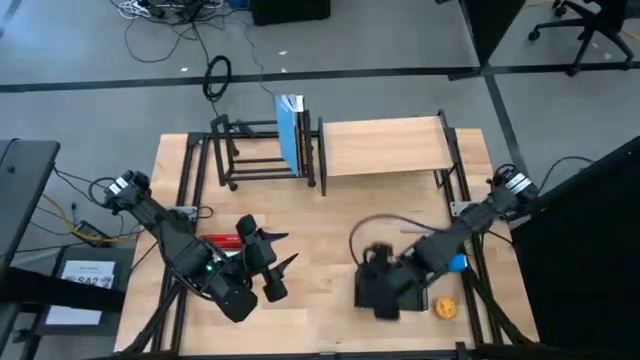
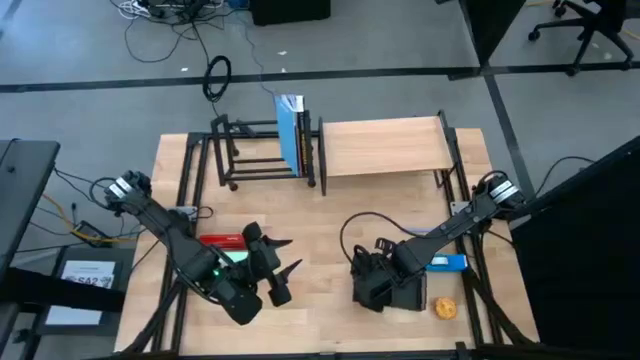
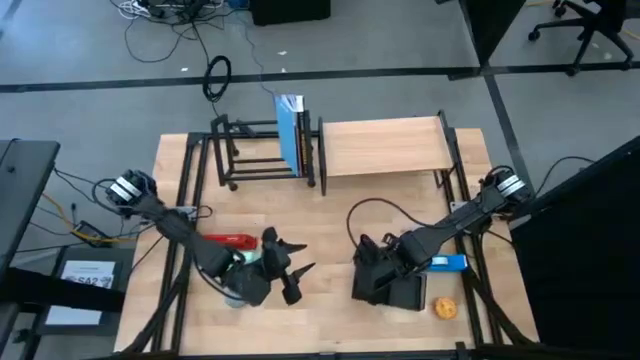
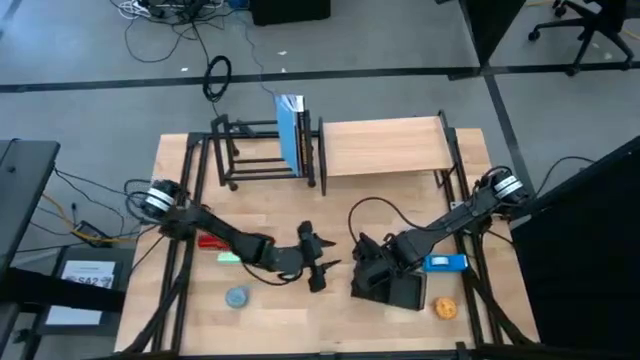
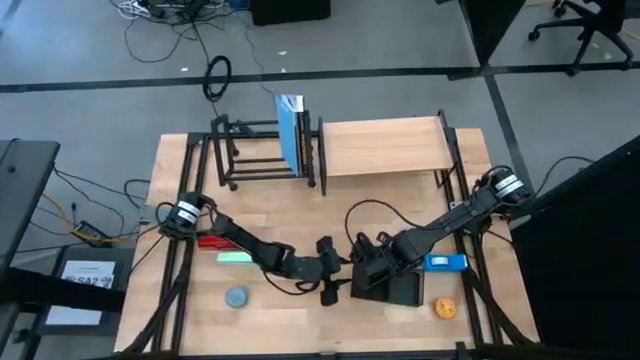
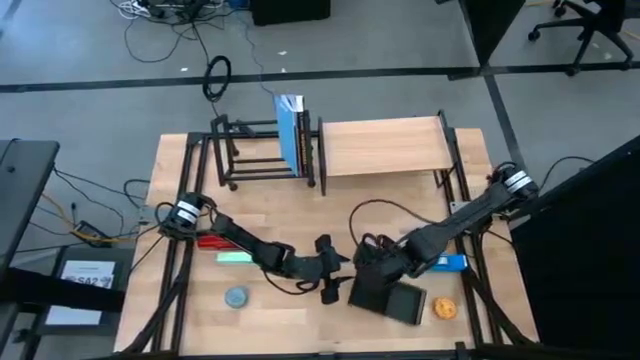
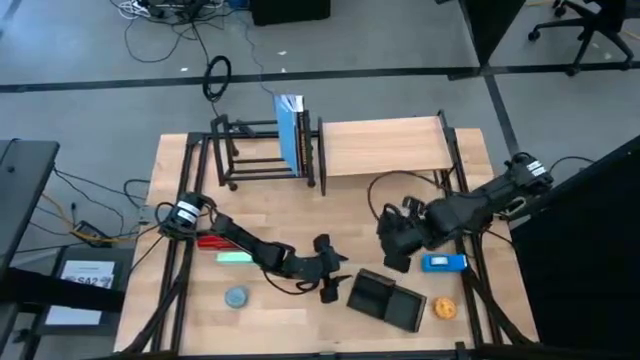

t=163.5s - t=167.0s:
Task: Stock shelves
Remove the blue ball pen from the pen organizer

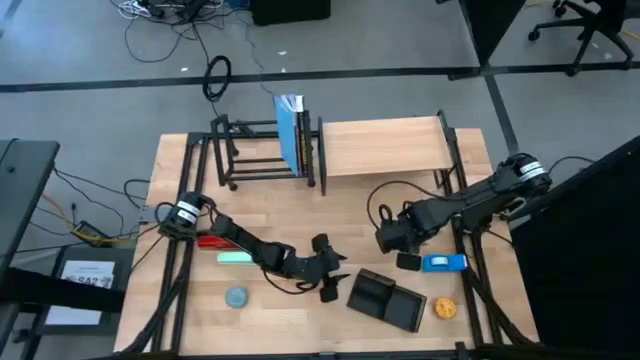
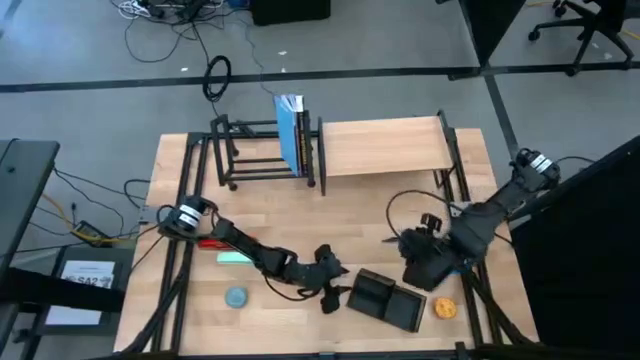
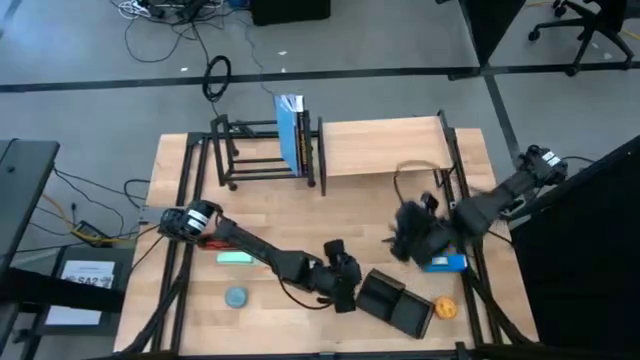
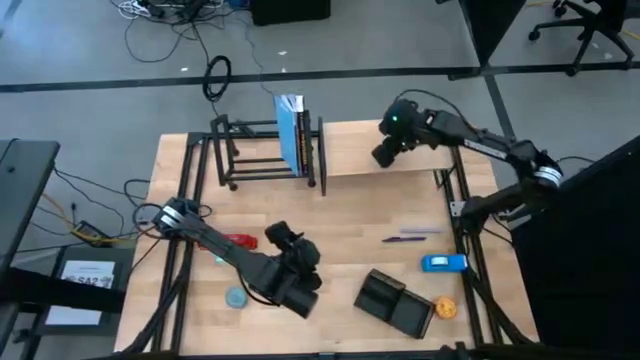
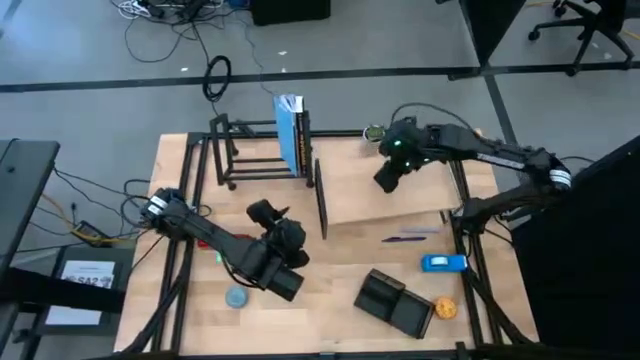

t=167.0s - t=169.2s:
Adjust the pen organizer and shelf

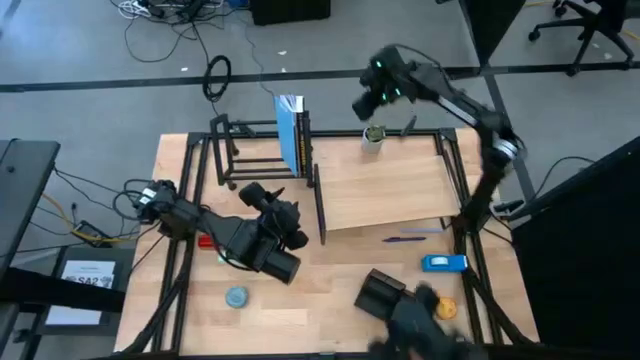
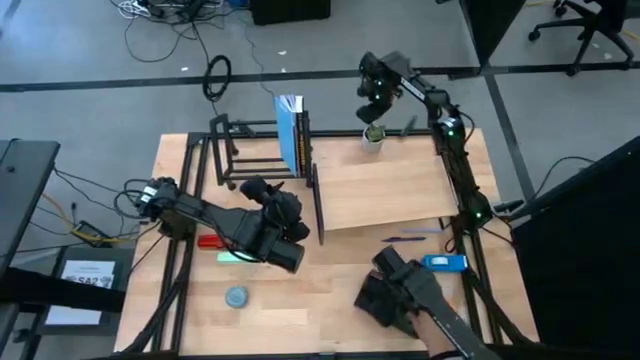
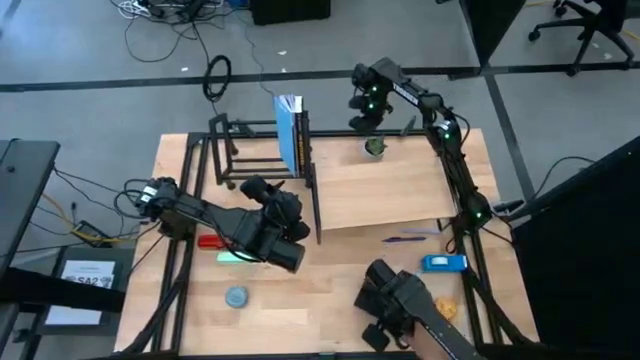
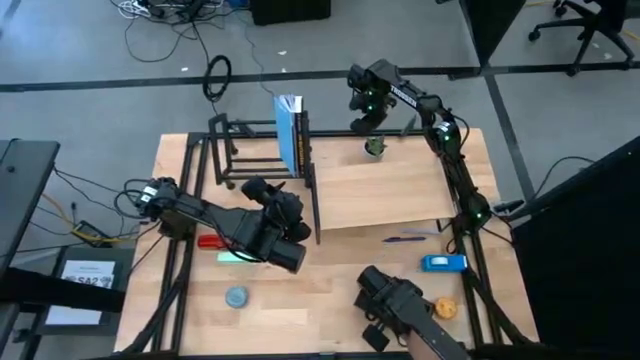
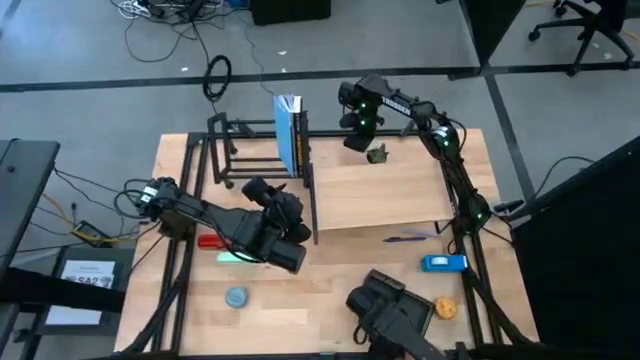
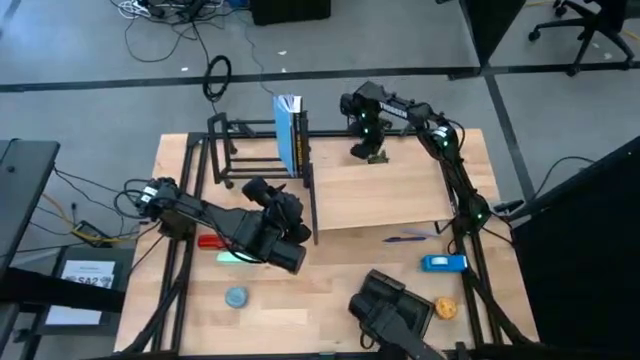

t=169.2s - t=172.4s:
Adjust the white vase plant

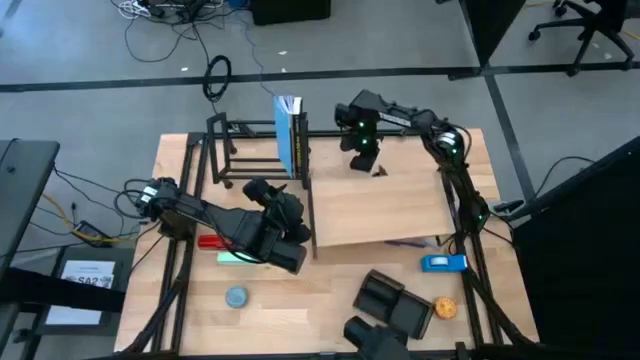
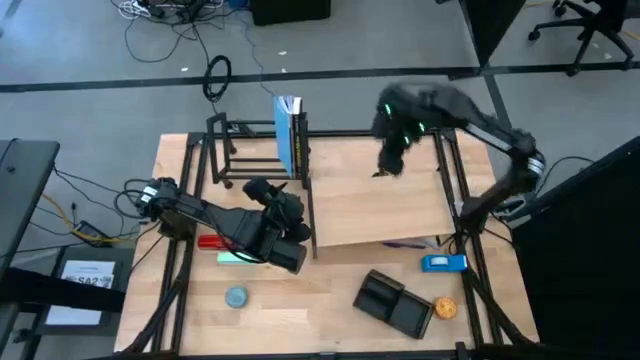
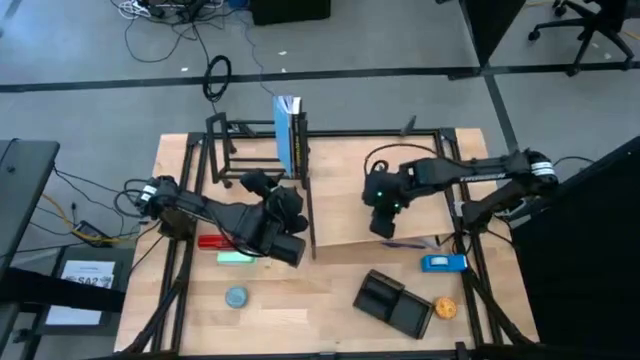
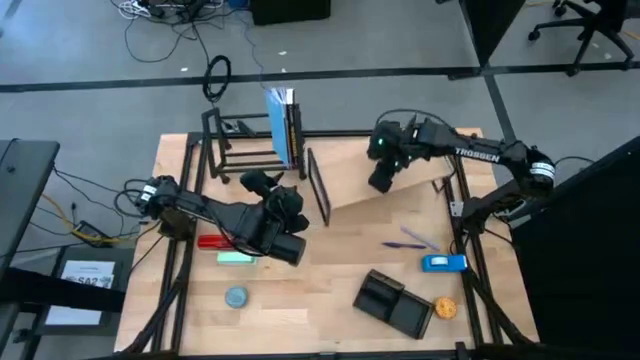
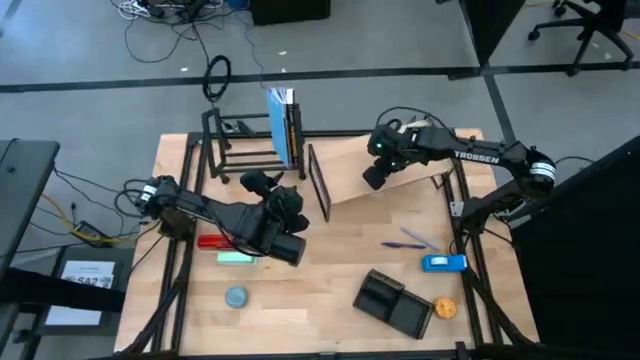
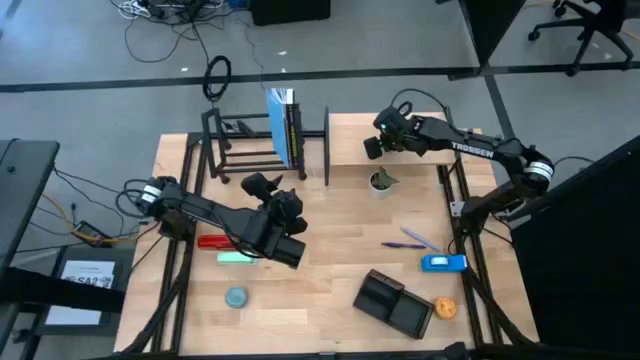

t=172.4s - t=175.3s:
Move the shelf to the top

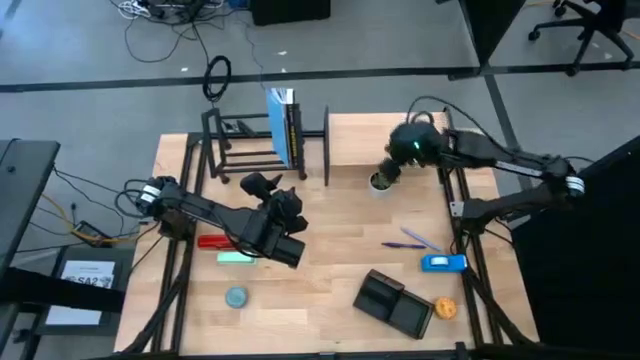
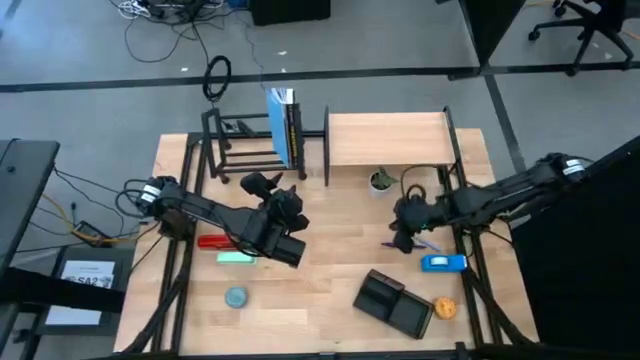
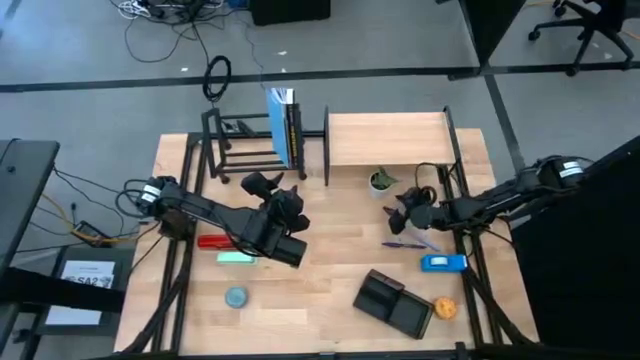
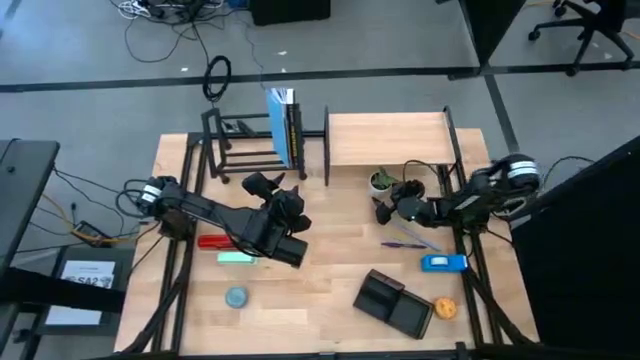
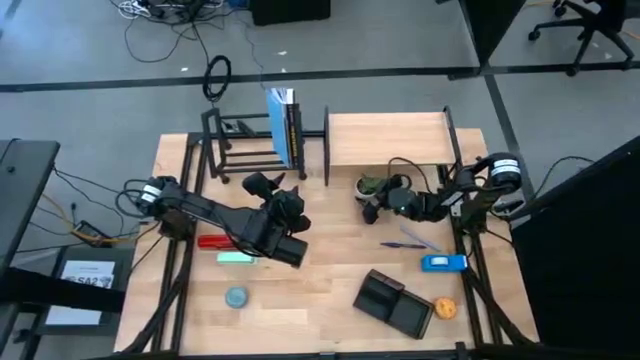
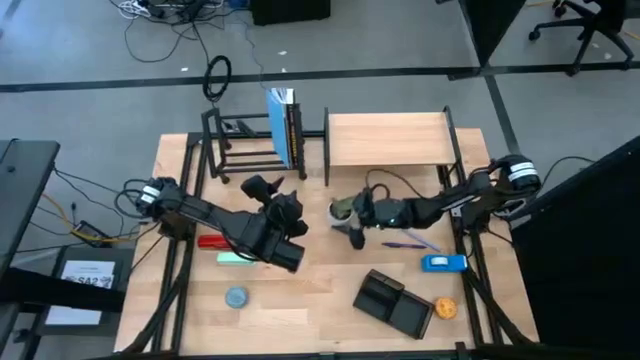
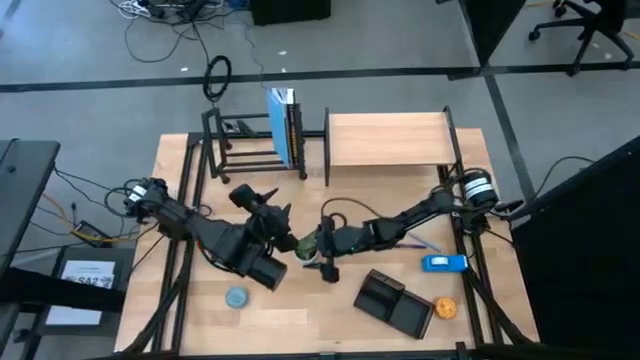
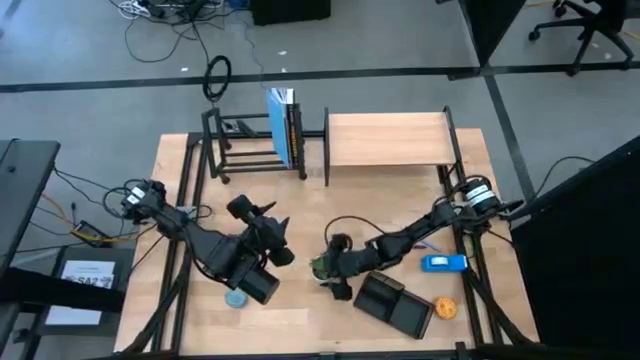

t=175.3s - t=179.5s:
Remove the white vase plant from under the shelf

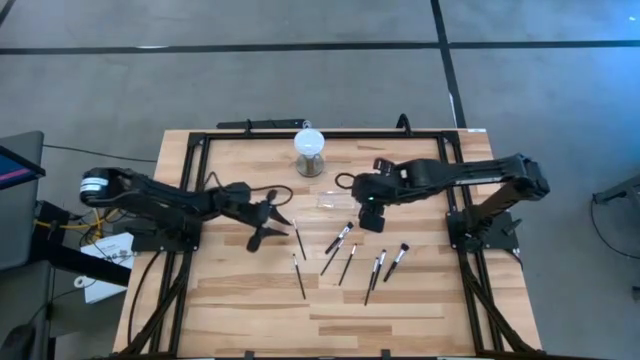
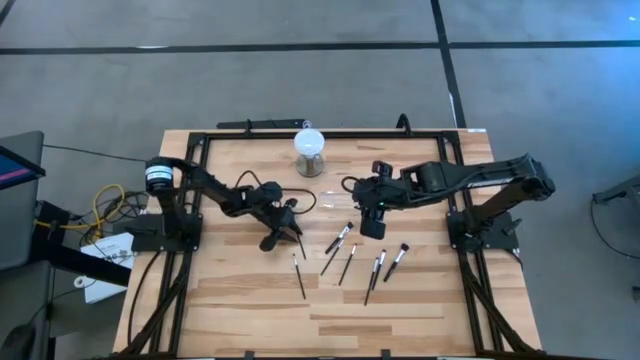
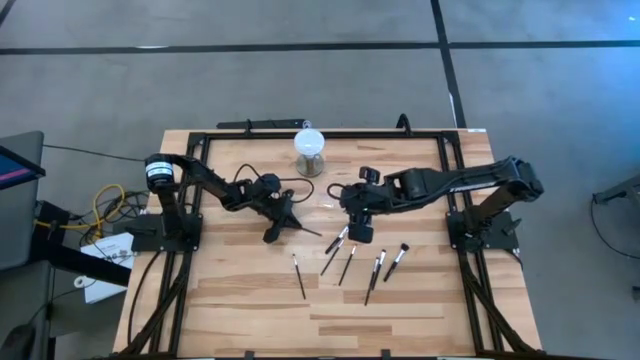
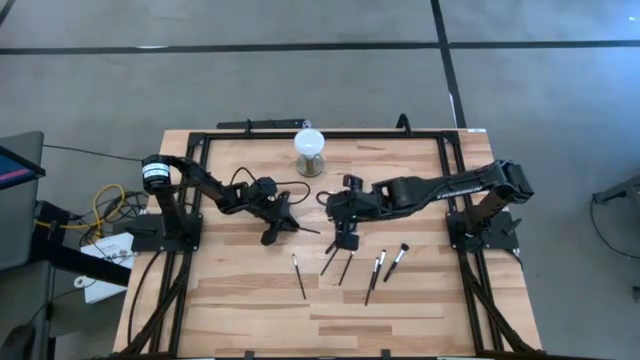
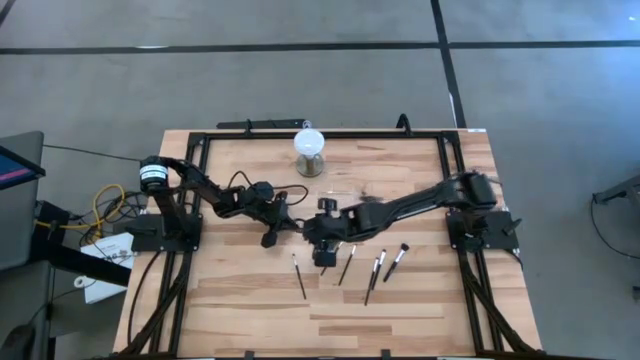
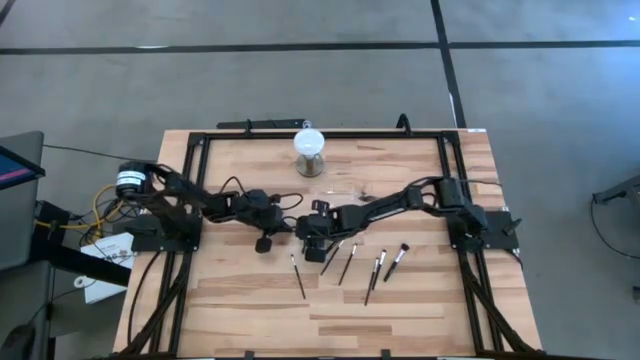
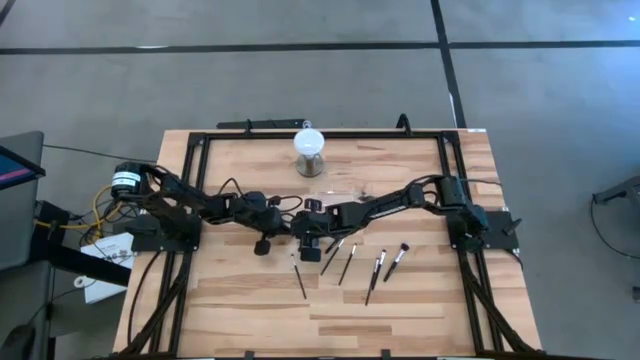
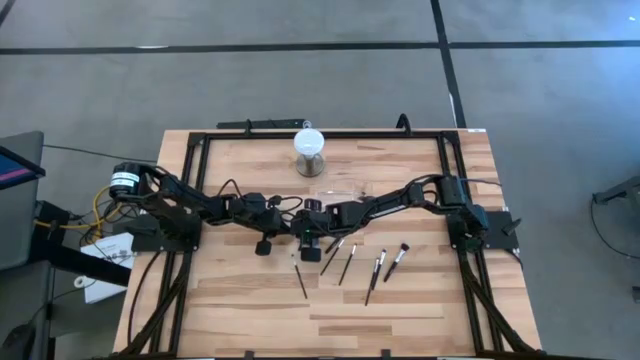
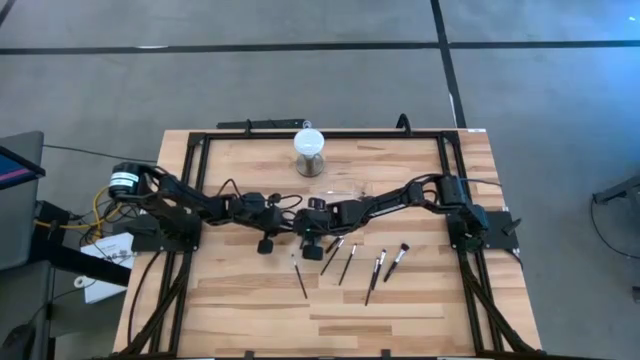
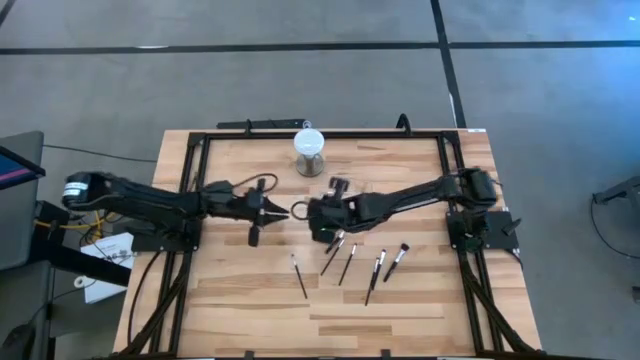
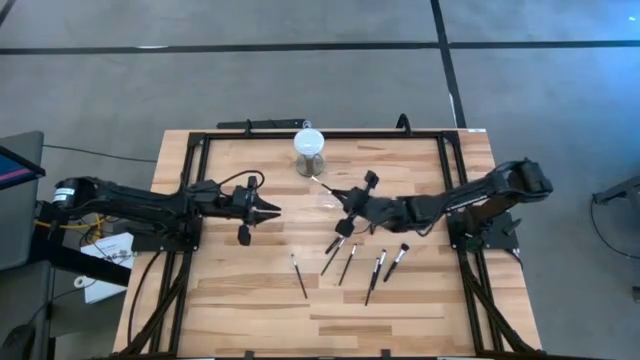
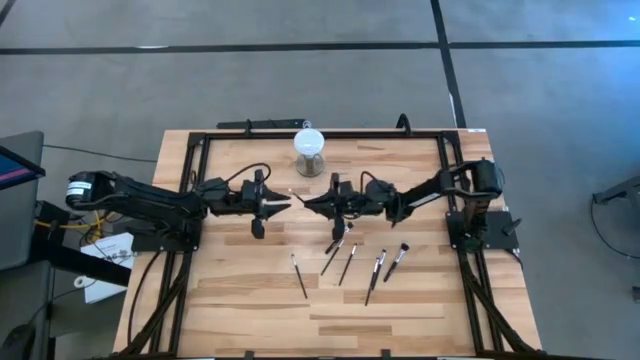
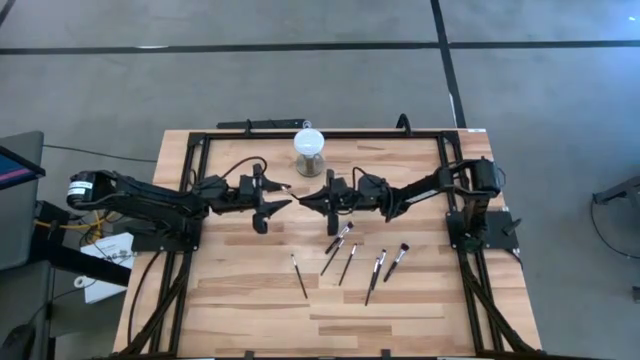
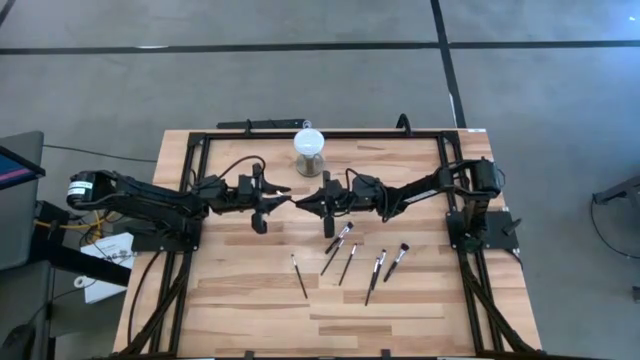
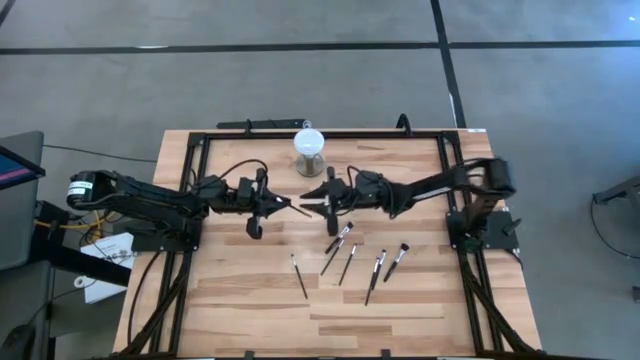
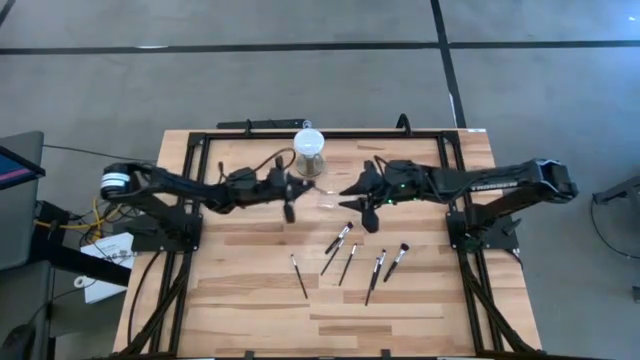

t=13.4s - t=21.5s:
Task: Put items in baskets/containers
Put the black eyeshadow brush into the transparent organizer
